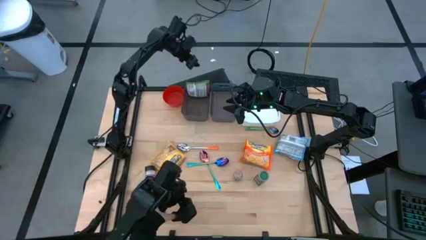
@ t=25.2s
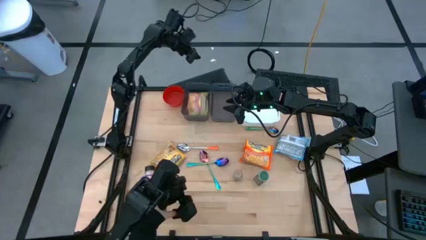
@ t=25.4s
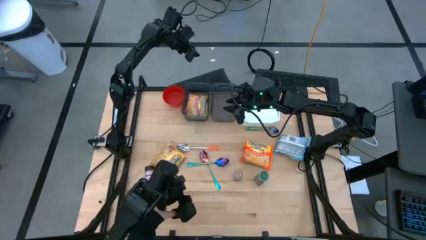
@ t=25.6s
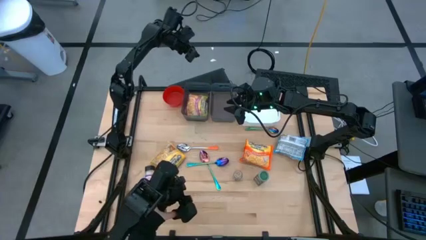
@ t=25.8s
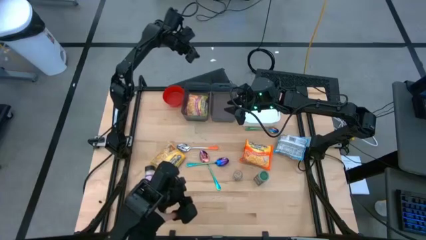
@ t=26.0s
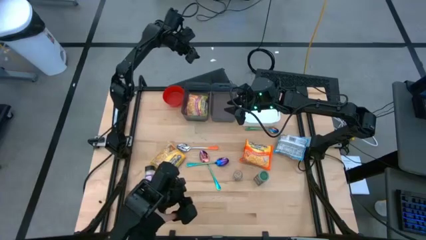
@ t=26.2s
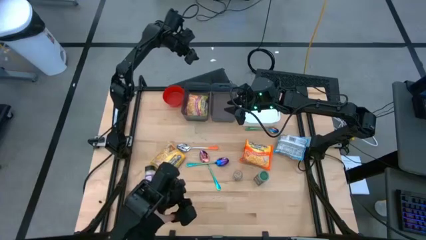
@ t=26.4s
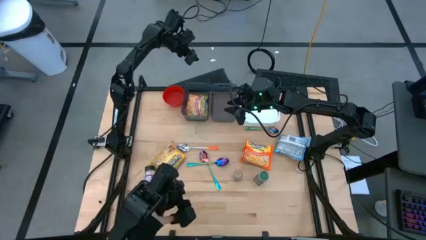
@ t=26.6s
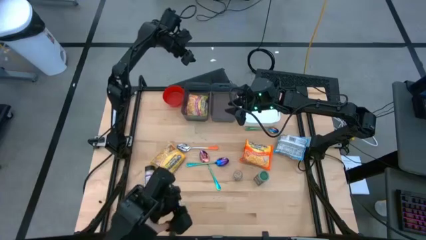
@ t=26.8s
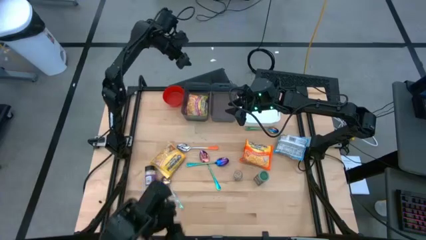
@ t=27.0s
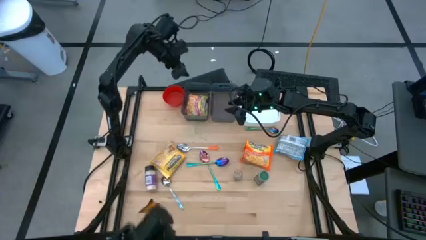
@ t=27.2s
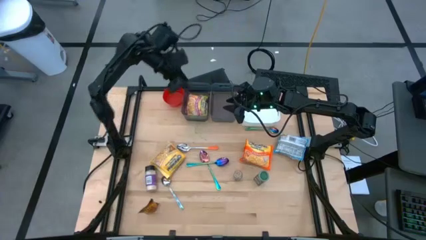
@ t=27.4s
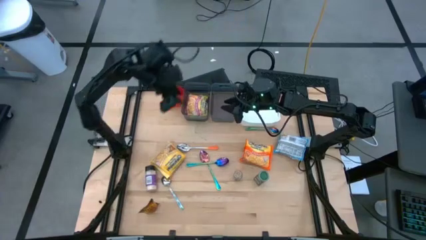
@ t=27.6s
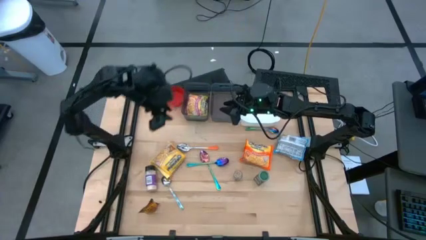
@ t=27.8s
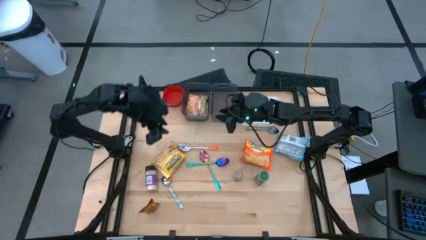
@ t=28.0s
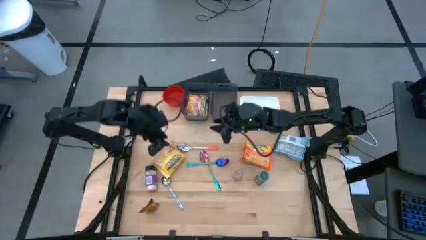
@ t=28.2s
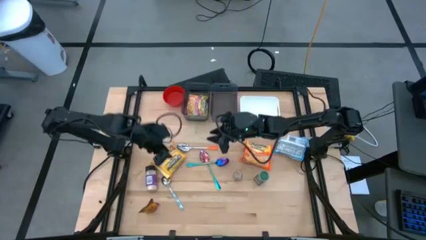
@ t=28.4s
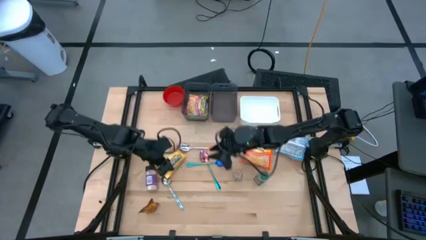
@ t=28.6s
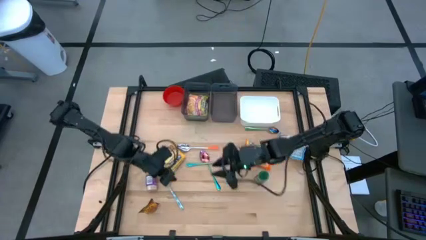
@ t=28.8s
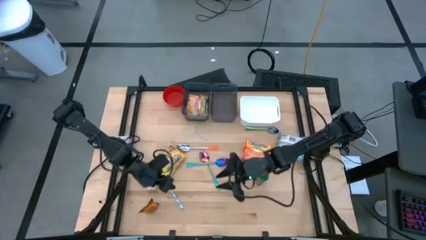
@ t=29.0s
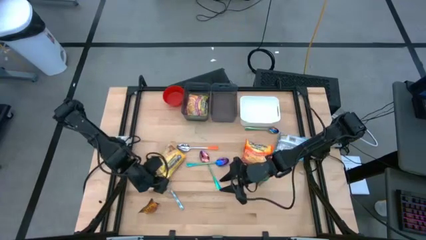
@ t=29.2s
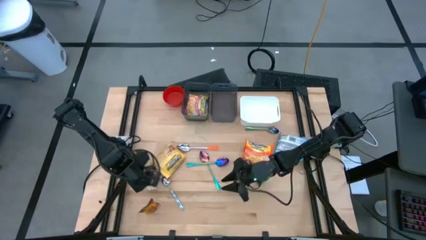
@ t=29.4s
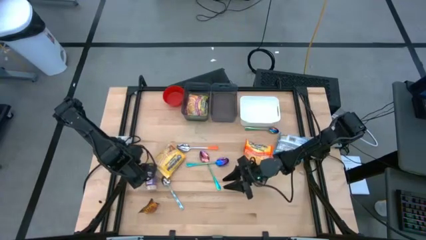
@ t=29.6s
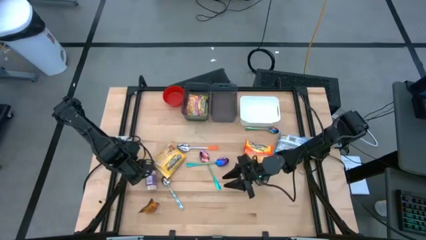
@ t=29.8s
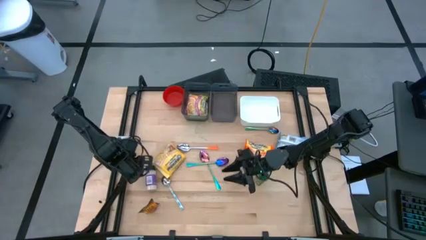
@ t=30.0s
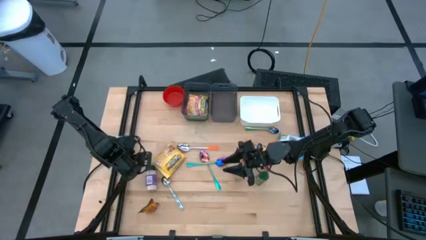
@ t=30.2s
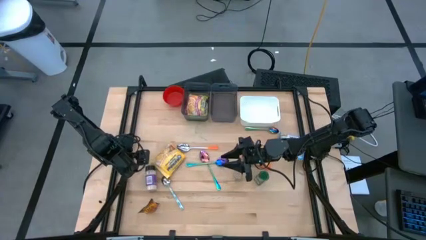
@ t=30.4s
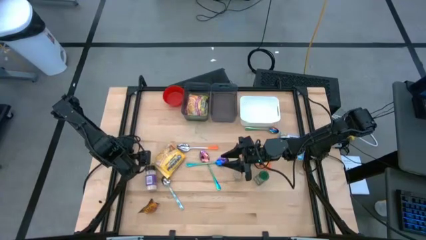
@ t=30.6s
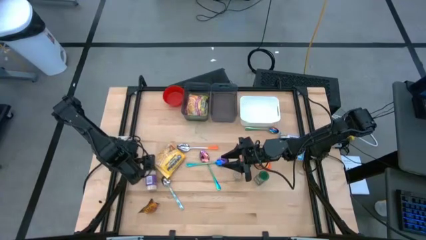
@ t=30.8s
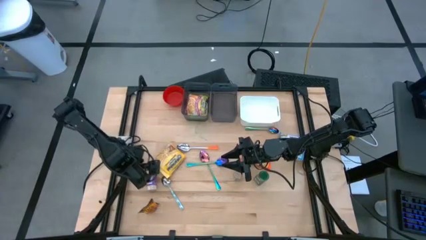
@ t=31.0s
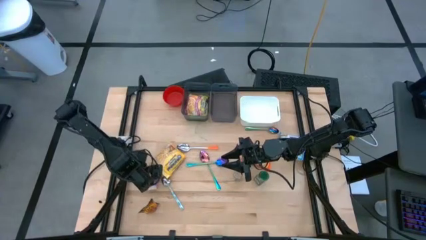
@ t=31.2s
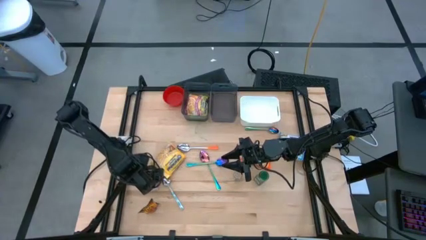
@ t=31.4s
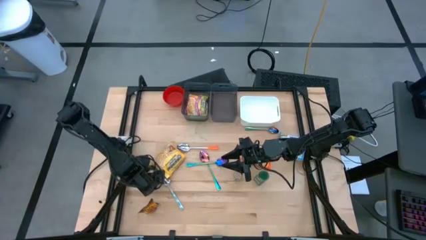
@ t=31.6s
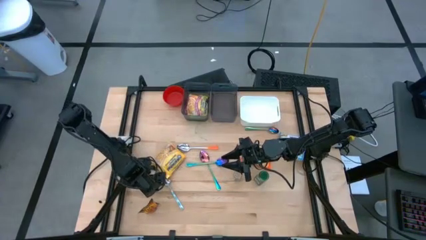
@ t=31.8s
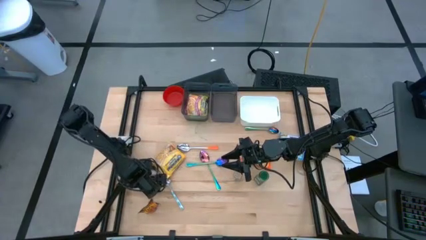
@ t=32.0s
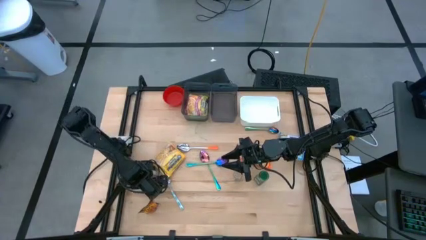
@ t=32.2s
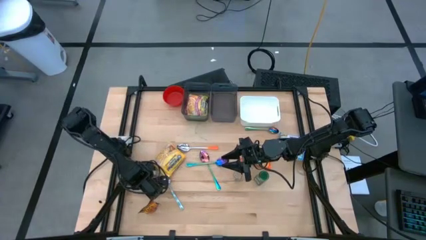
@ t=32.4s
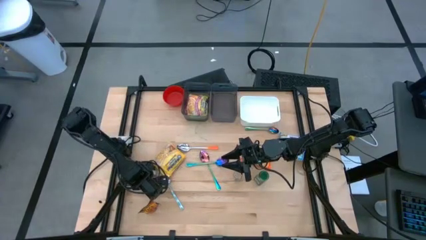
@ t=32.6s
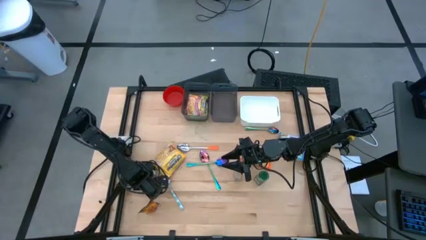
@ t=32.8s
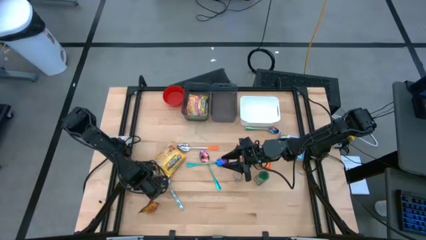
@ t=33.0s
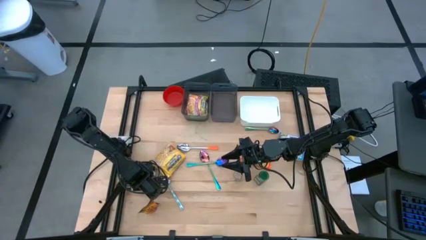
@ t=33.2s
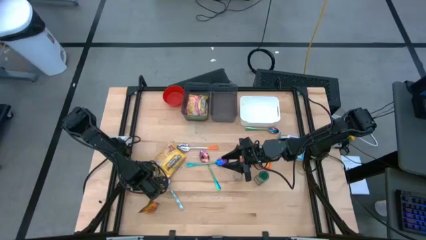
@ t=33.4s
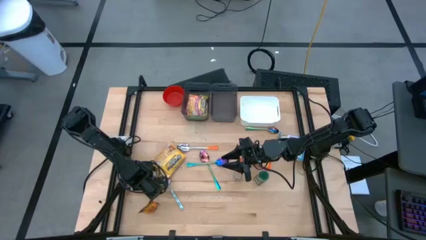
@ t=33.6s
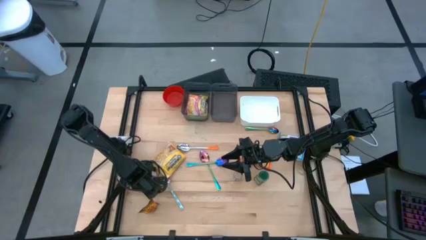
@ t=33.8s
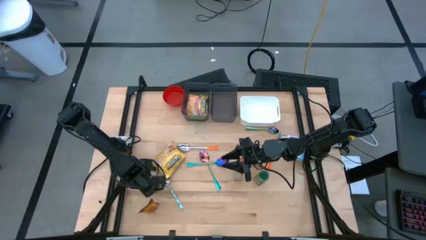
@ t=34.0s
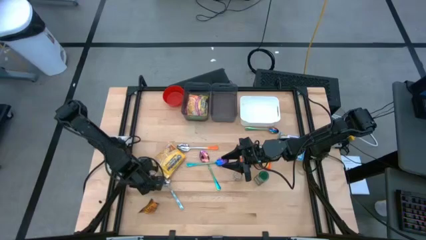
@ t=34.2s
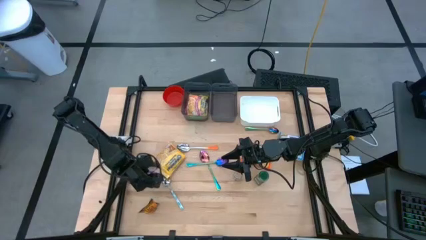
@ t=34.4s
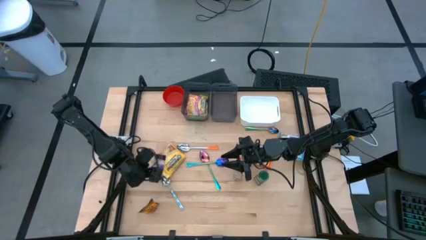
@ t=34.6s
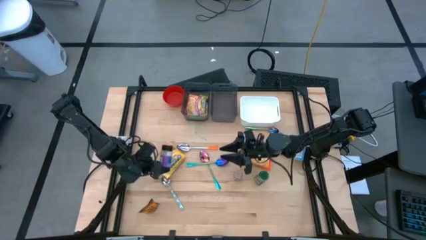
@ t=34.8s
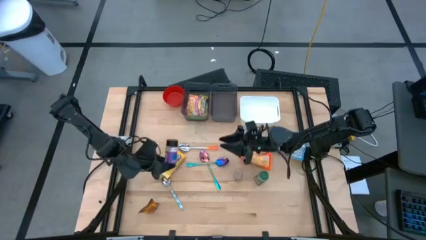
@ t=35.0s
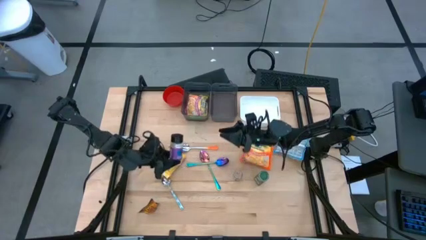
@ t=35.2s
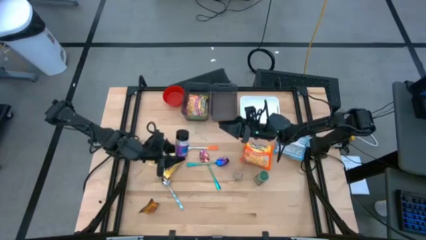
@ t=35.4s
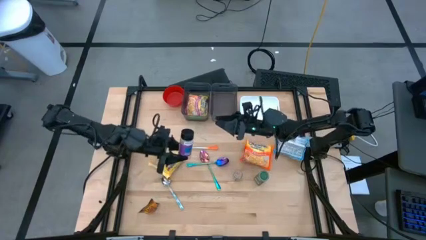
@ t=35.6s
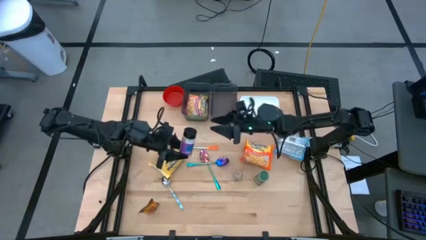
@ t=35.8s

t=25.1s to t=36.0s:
Task: Pick & Place Food Item
Put the black seasoning bottle into the white bin
